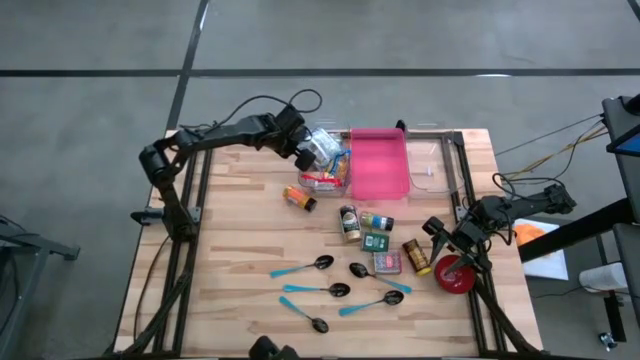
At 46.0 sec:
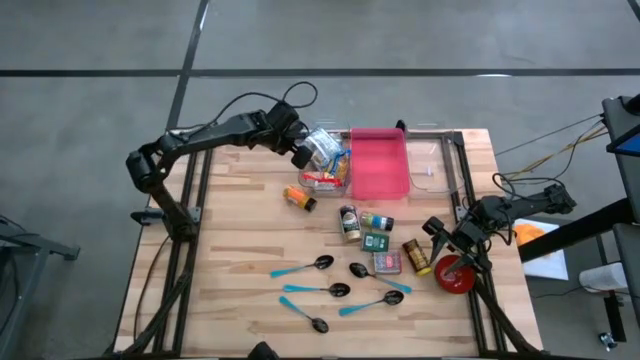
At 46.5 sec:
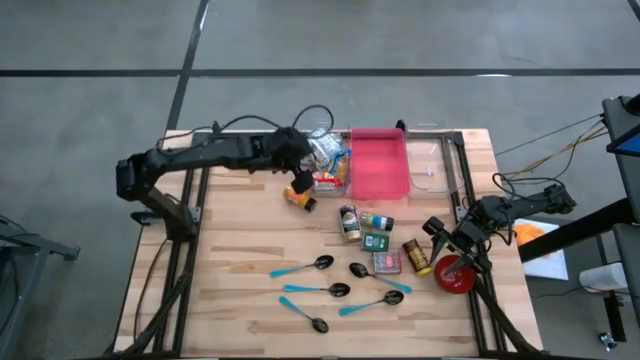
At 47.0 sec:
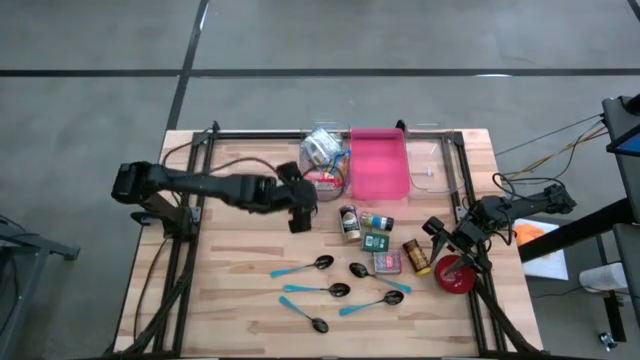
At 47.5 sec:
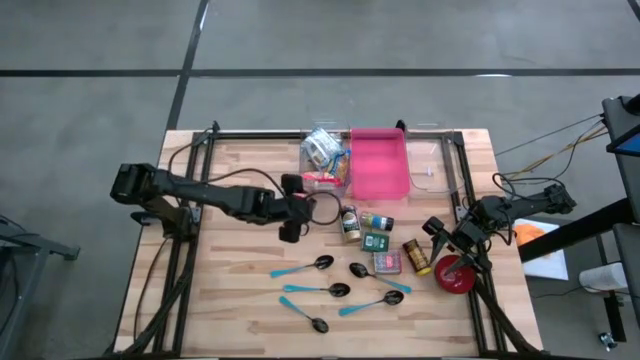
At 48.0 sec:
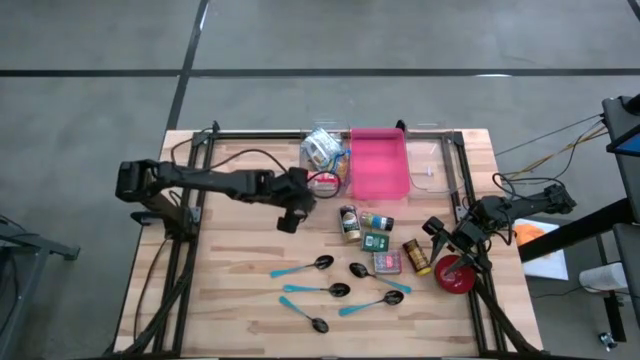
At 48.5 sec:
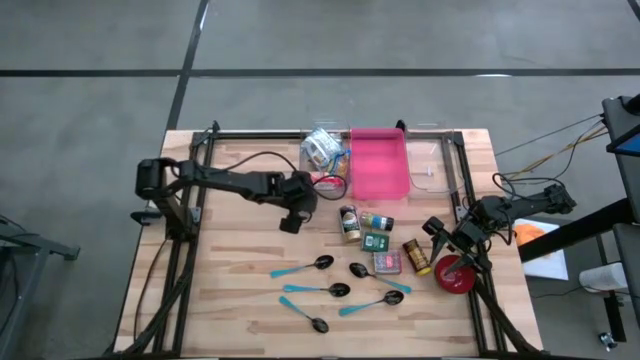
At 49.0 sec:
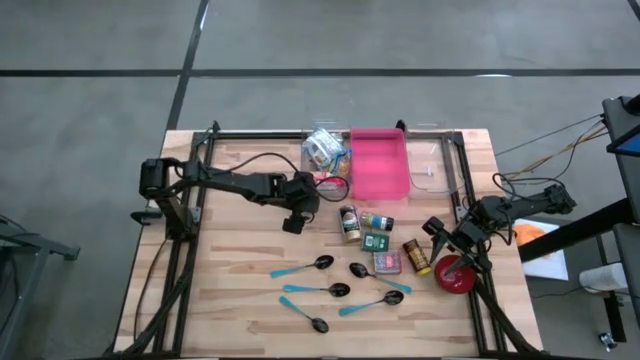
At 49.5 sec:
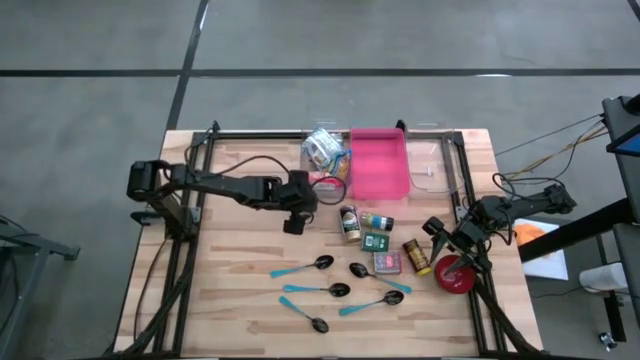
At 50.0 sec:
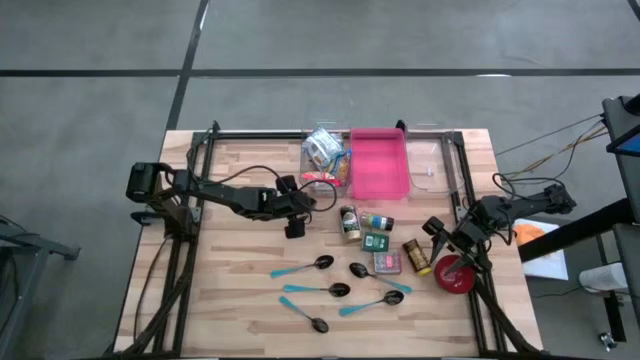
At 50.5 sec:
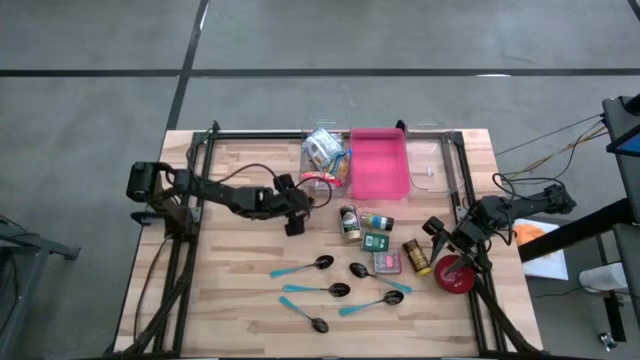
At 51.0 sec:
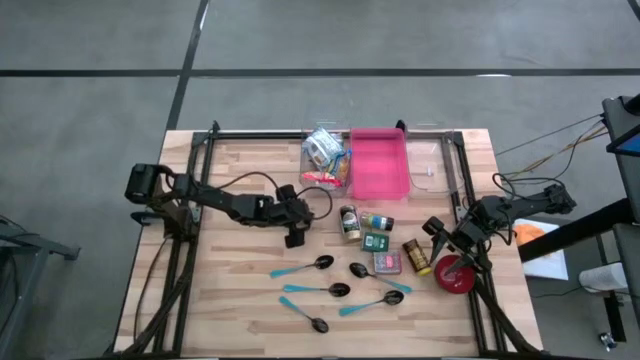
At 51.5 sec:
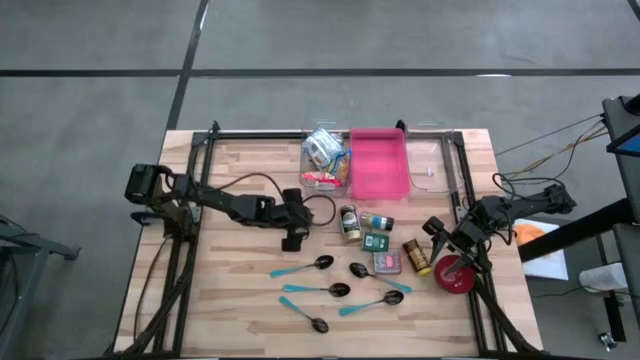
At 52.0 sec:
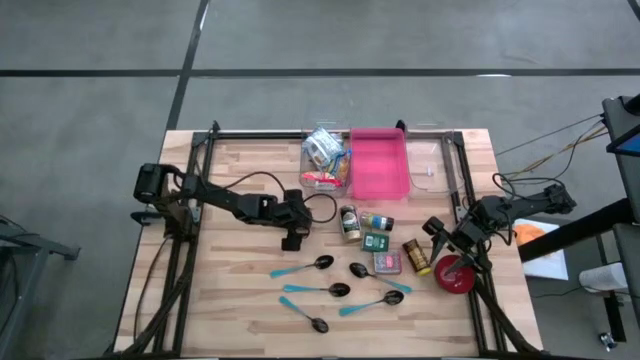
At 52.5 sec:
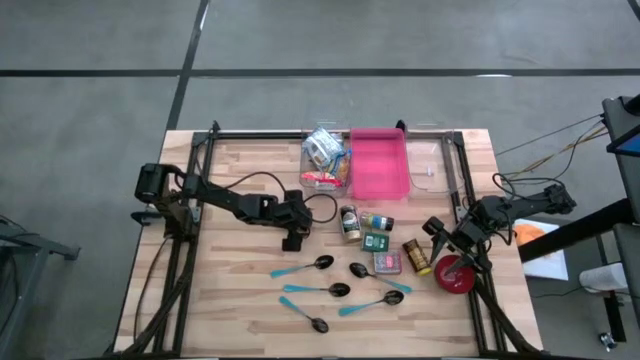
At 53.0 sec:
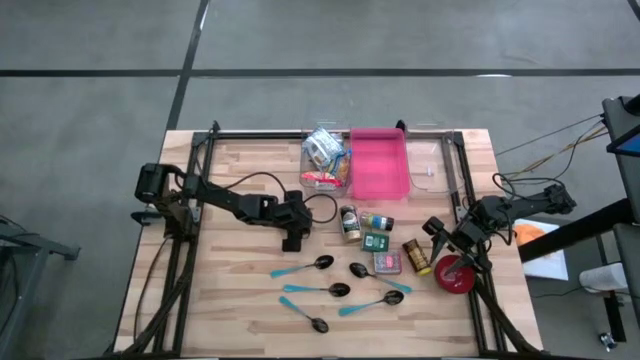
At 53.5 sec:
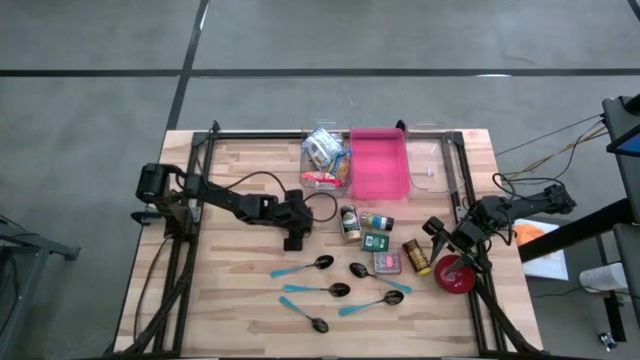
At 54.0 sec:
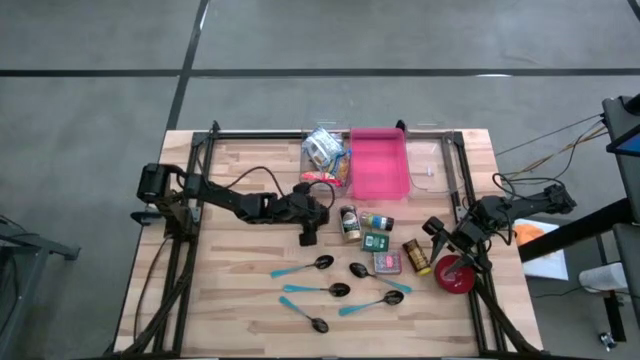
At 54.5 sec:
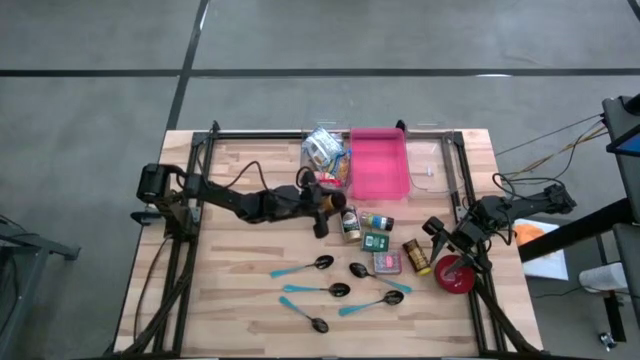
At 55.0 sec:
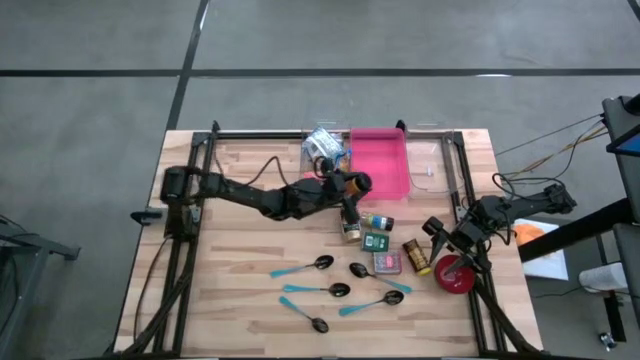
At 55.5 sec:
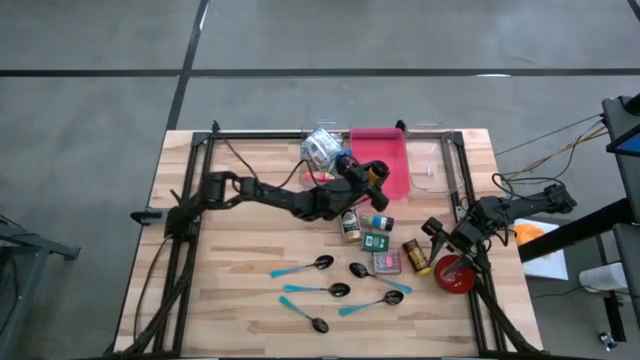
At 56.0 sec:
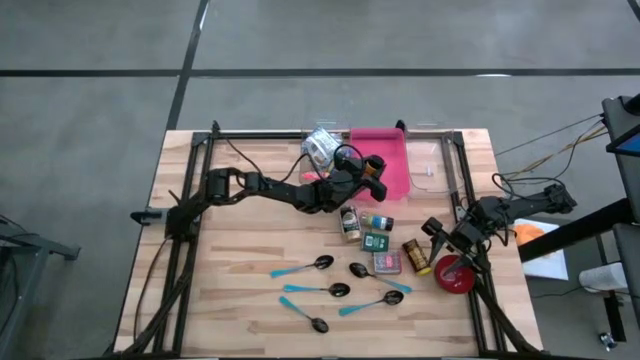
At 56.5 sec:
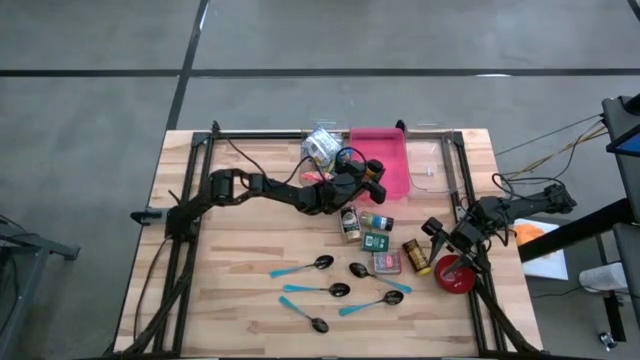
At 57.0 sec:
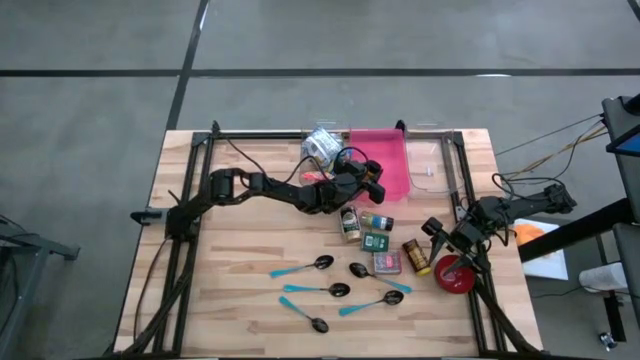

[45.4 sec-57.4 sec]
Put the orange spice bottle into the pink bin

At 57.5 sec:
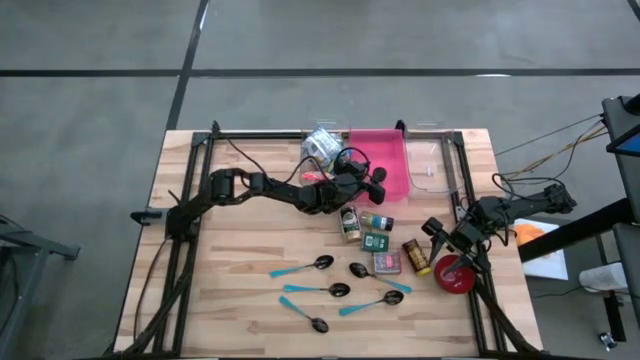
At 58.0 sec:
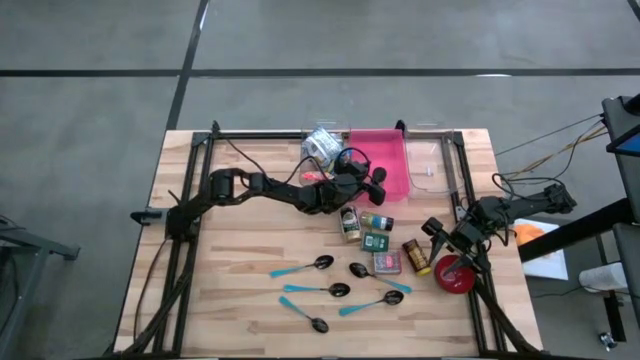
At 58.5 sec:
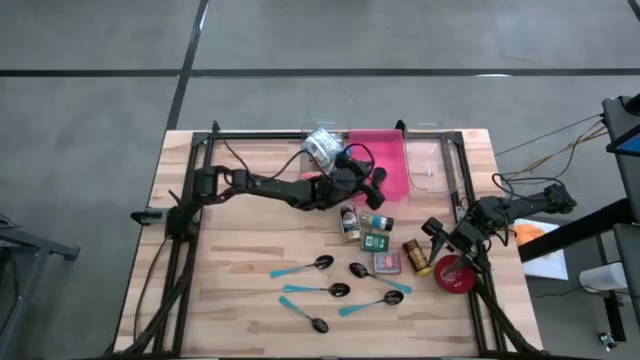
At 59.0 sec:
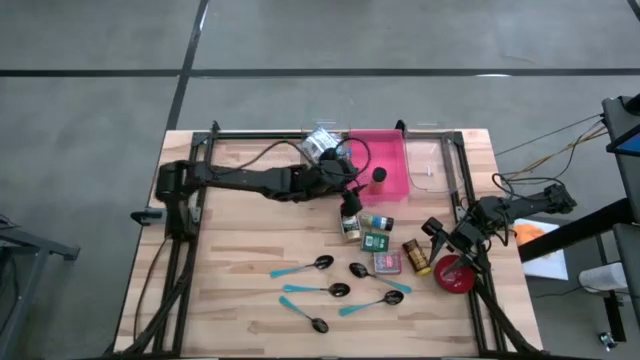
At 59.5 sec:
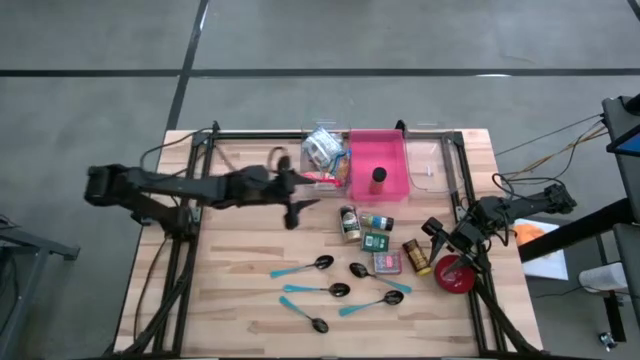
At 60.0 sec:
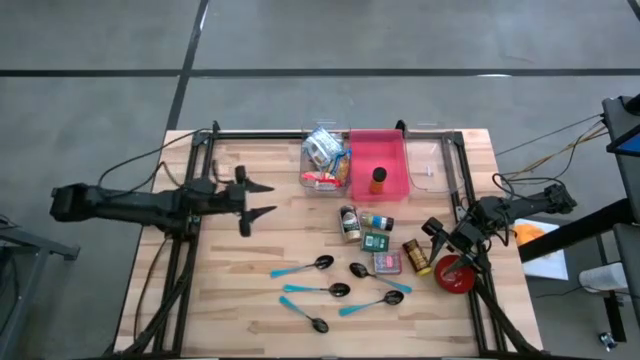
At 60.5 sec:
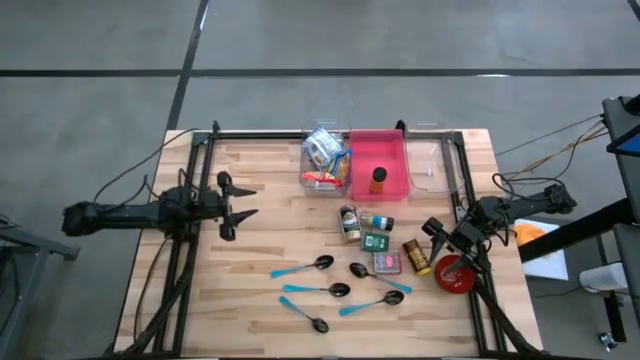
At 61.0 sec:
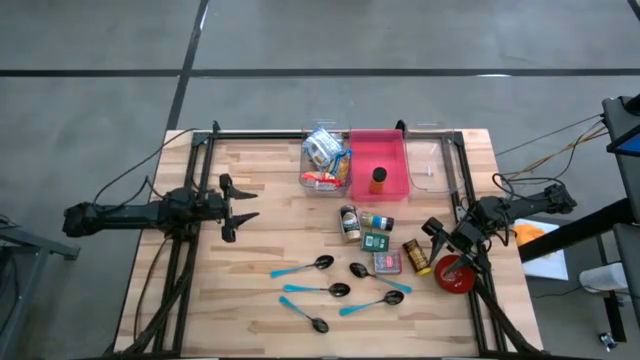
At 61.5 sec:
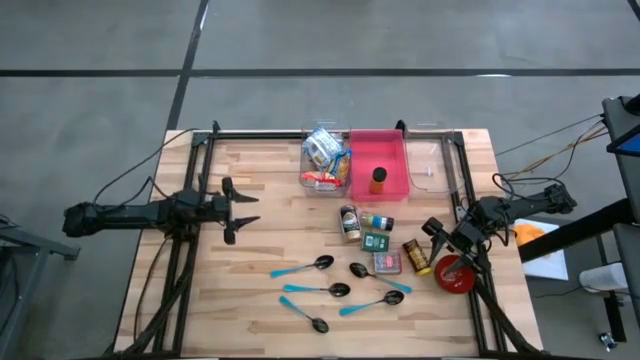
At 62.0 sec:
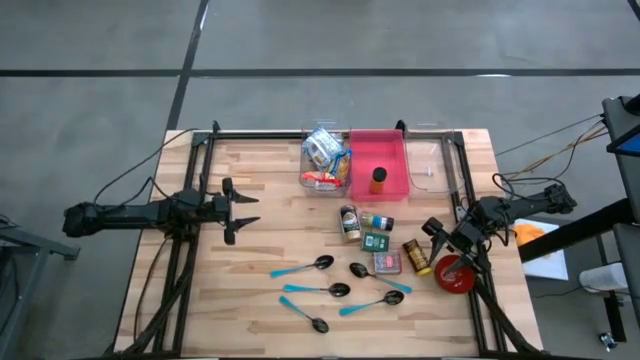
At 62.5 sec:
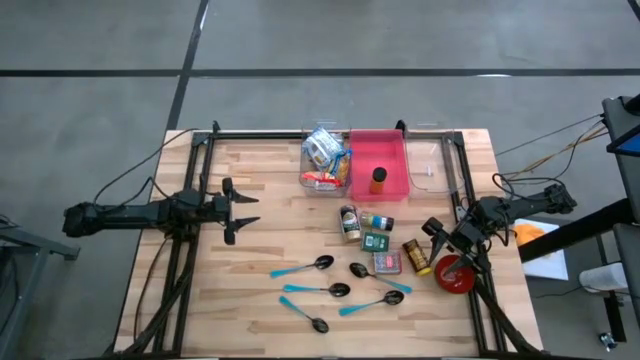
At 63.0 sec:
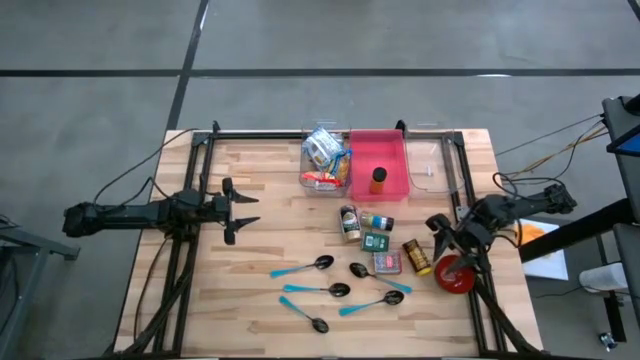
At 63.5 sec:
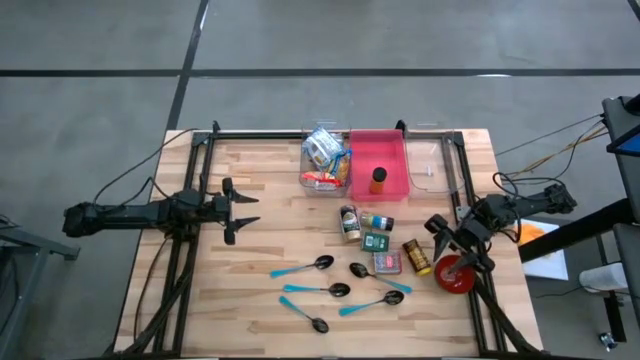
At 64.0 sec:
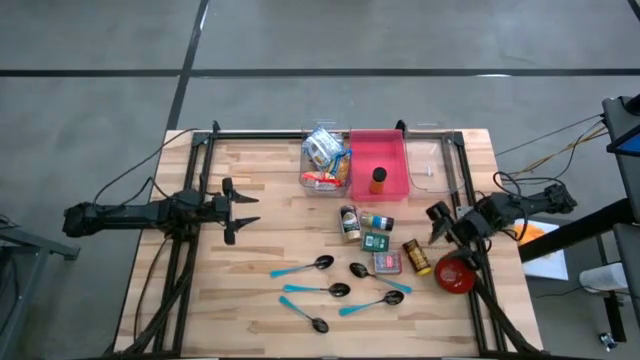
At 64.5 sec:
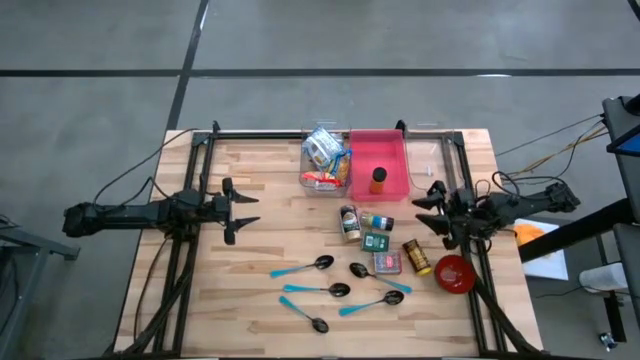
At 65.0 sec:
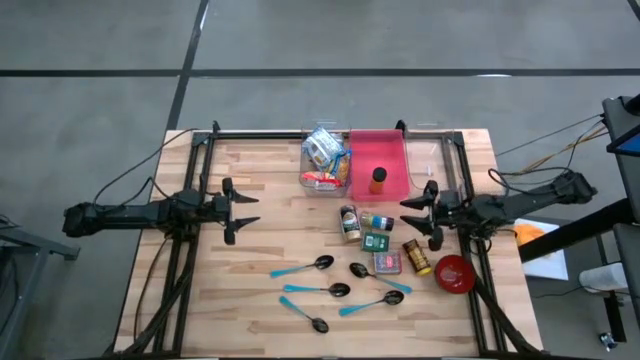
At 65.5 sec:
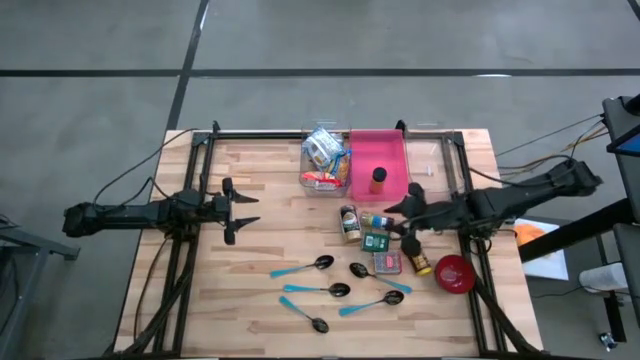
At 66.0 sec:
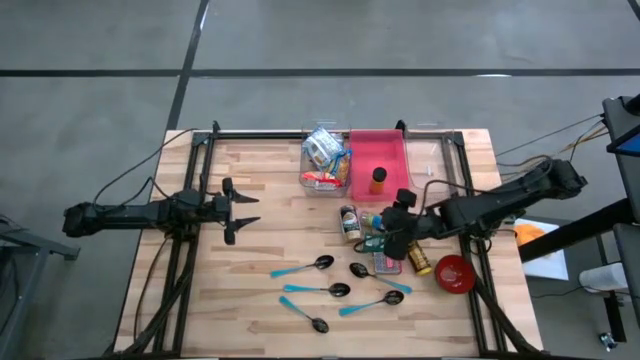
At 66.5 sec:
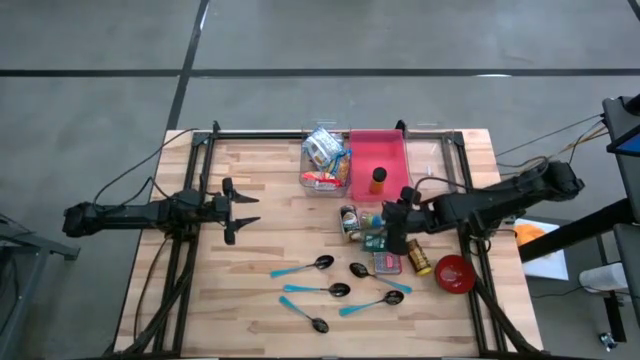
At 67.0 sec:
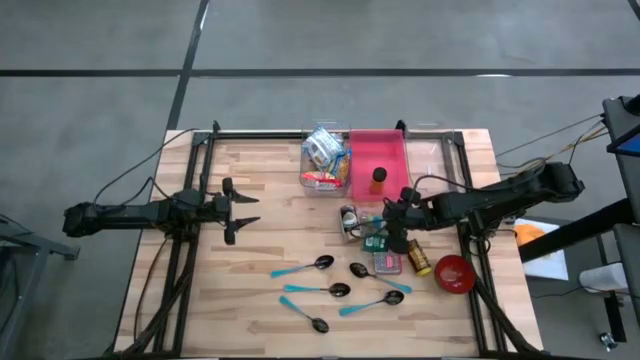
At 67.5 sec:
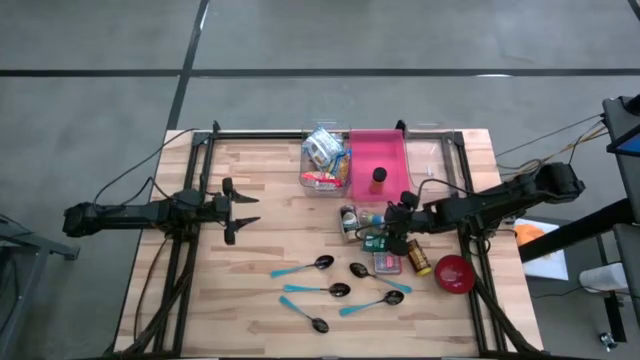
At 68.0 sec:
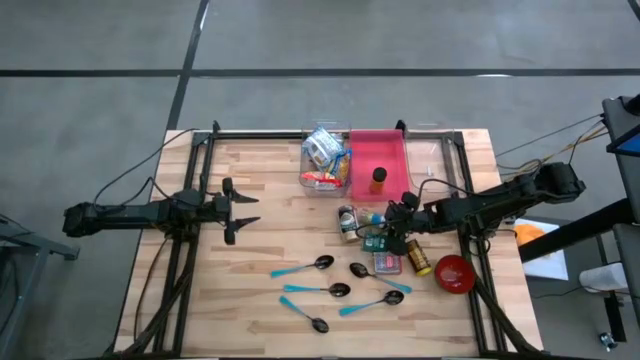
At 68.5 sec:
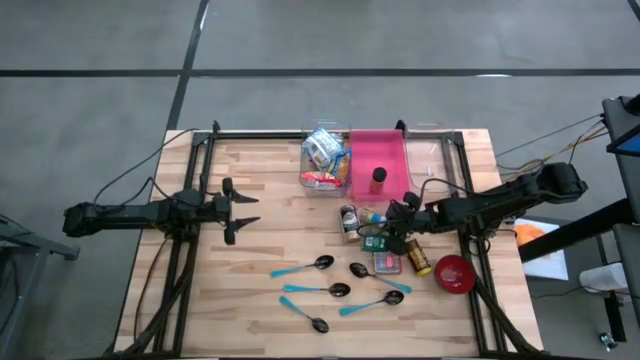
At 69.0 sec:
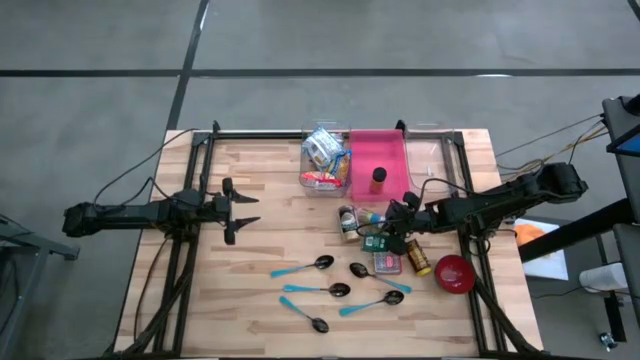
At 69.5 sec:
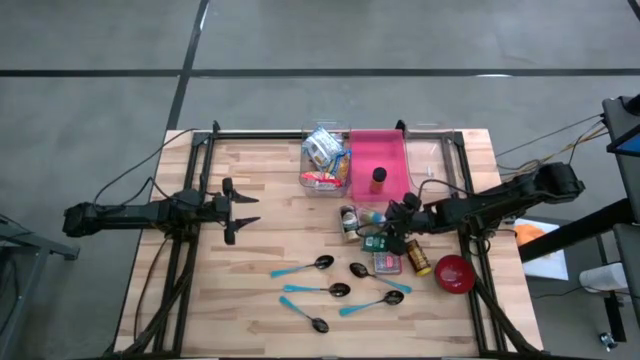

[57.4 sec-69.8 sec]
Put the green spice bottle into the pink bin
